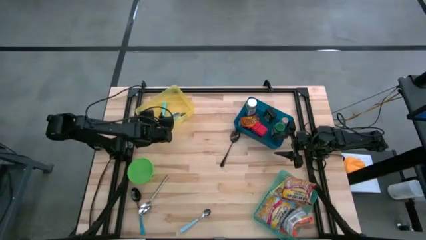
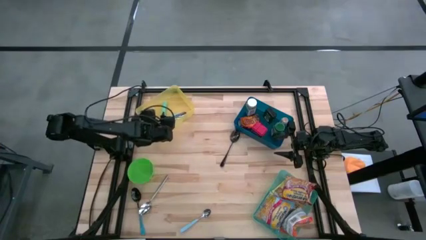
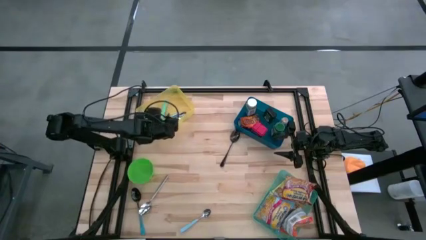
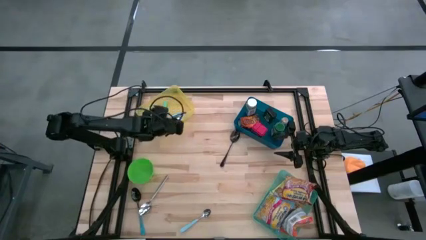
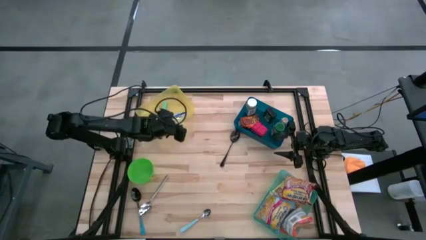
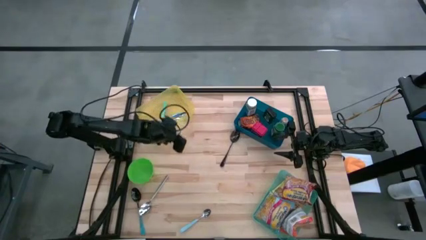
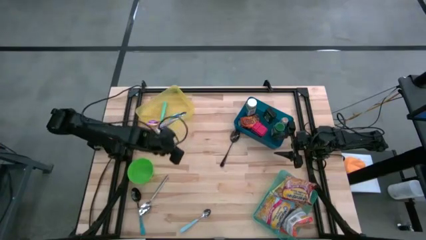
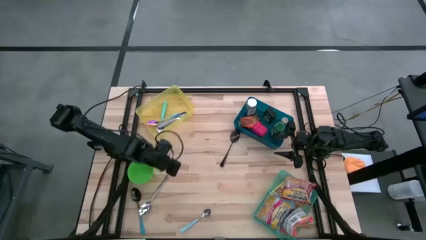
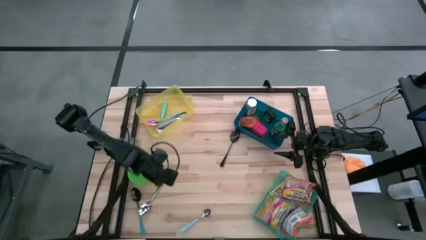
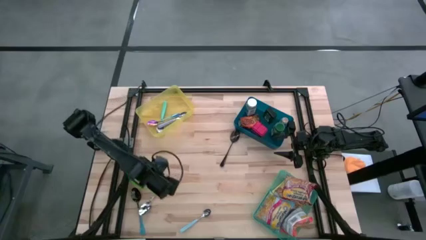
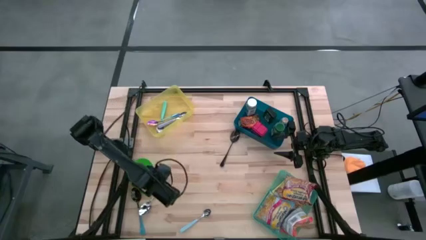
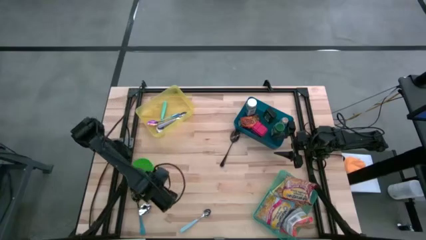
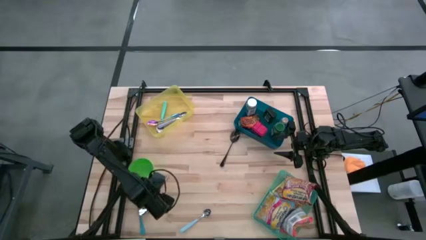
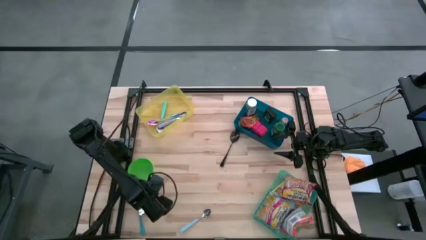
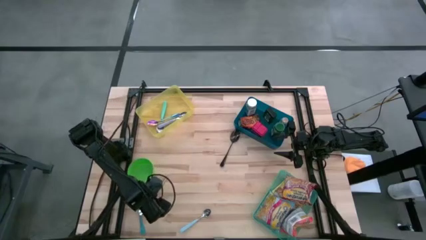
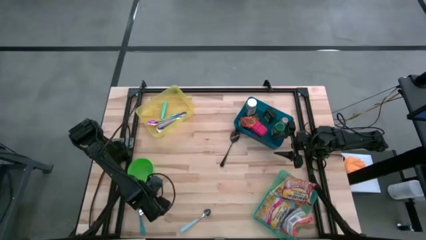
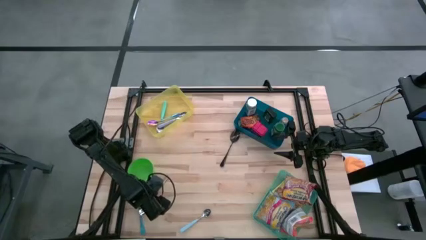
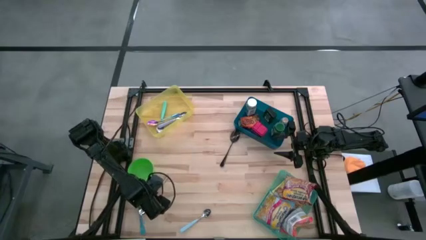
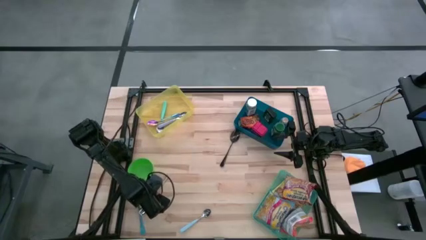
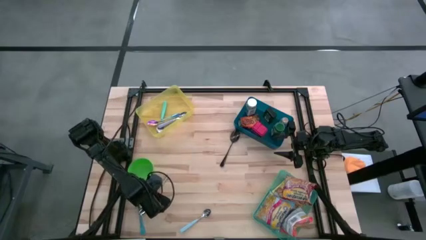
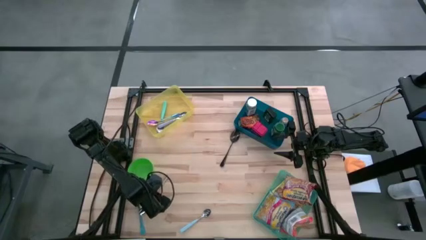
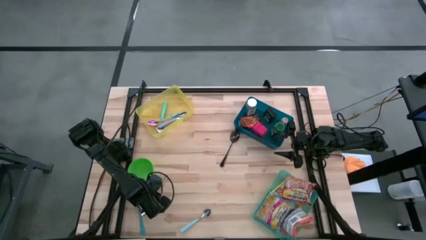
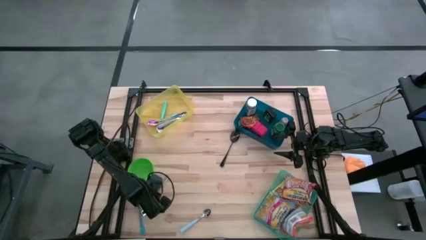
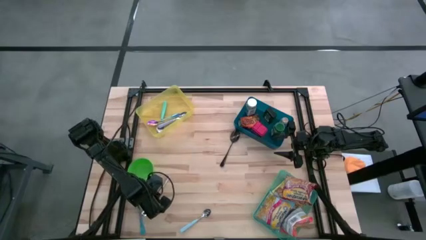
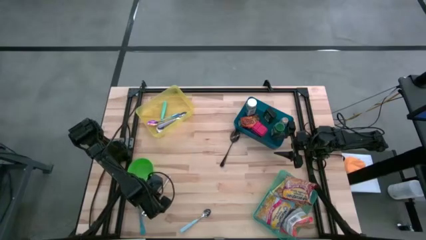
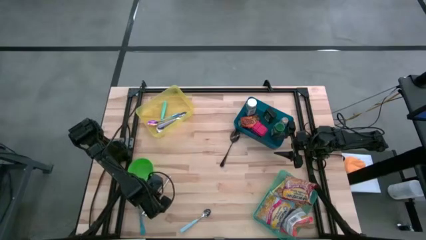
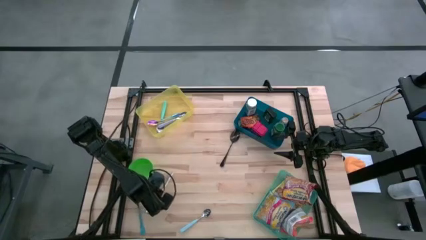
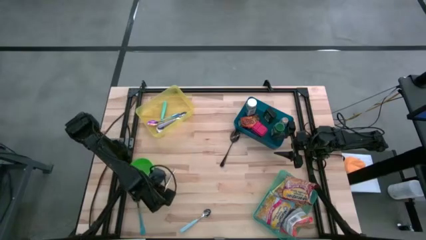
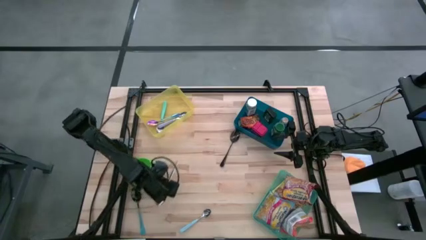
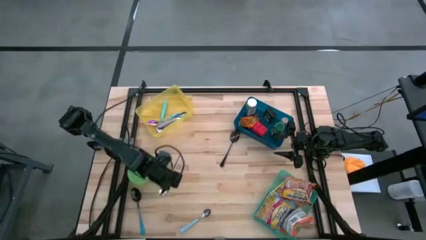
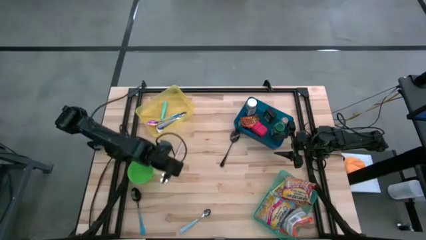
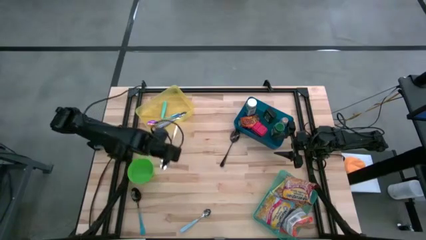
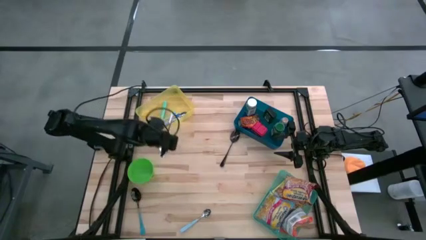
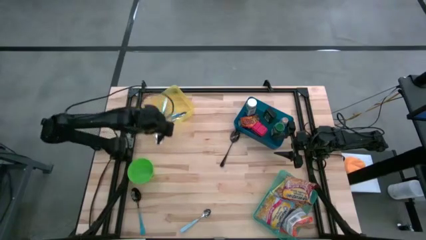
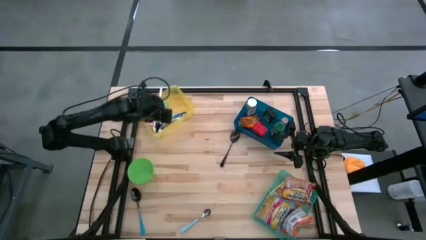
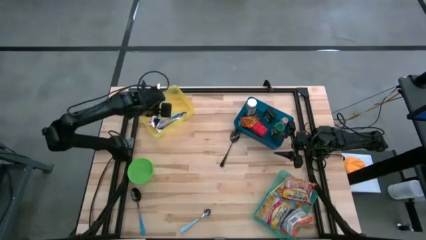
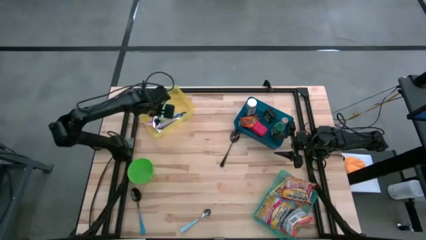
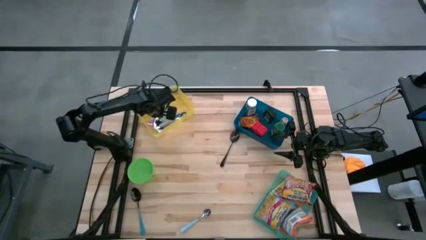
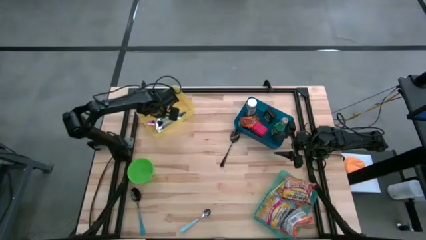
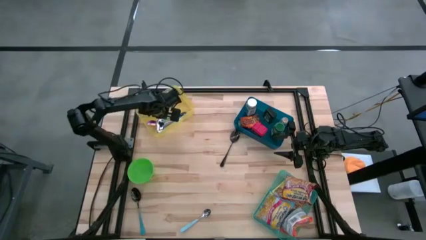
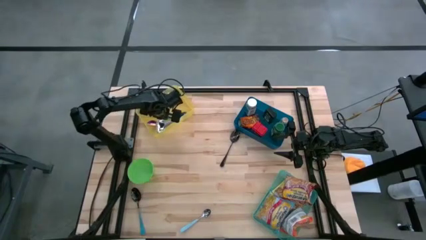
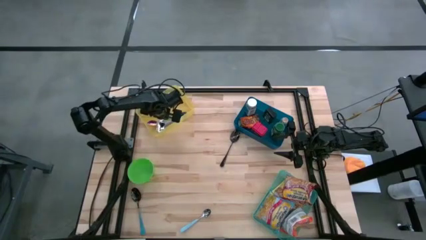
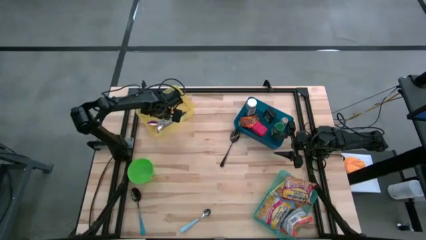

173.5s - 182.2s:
Put the silver spoon into the yellow bin

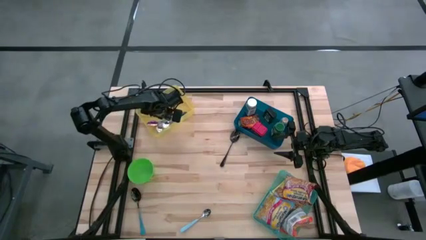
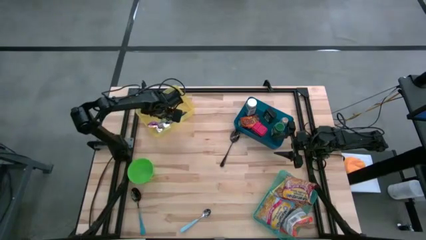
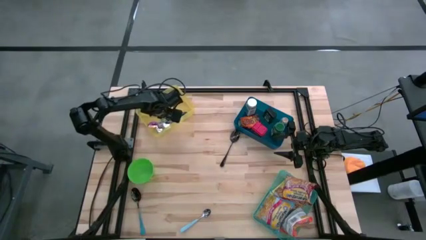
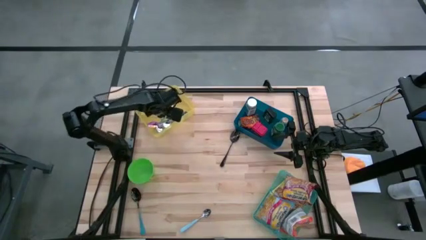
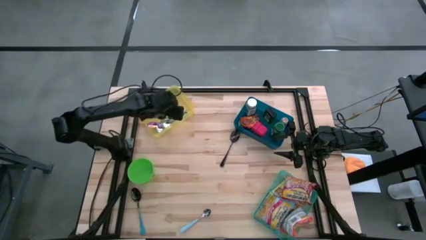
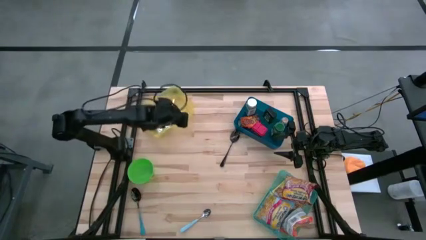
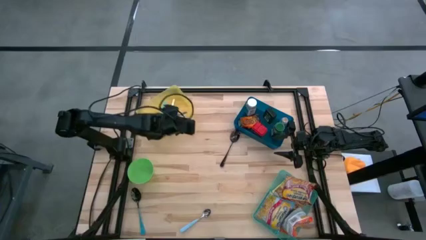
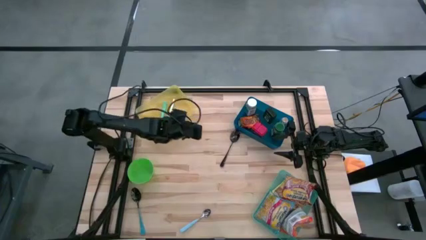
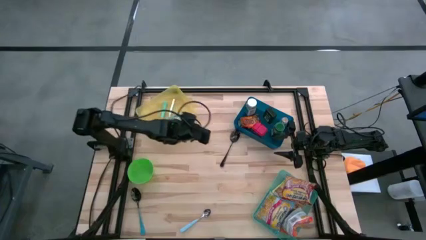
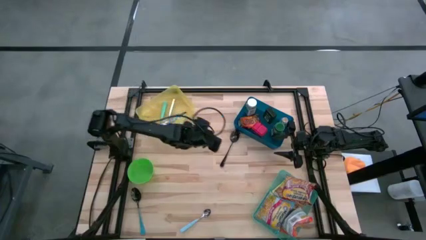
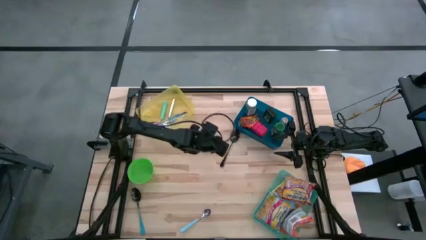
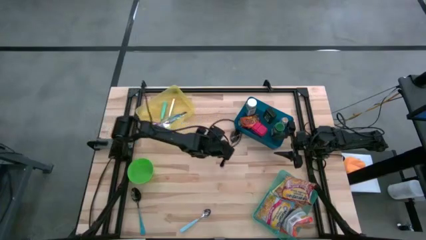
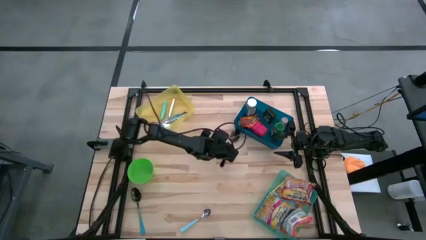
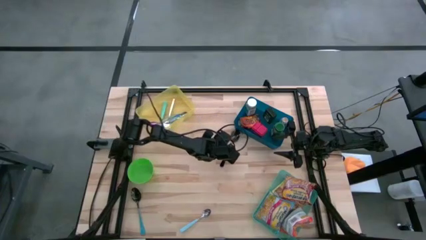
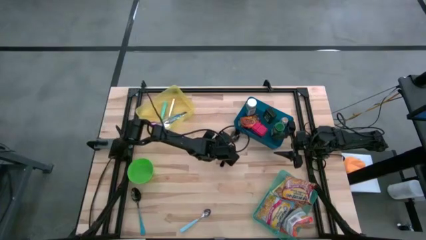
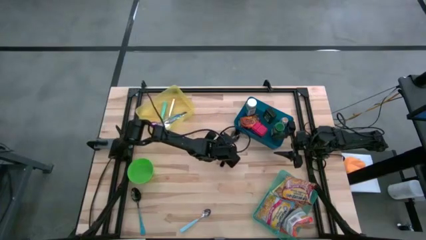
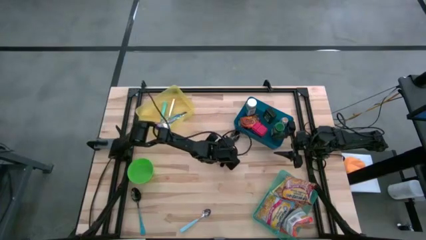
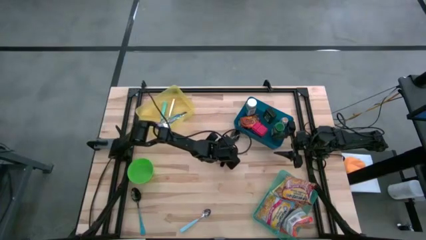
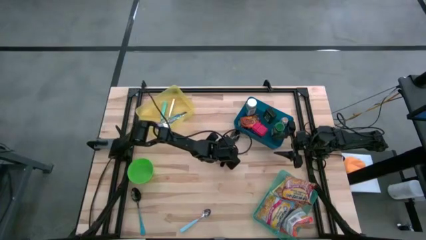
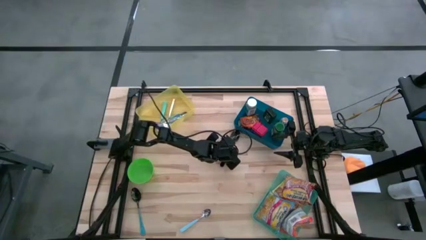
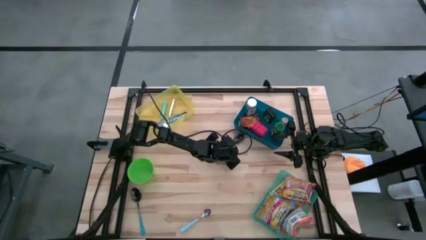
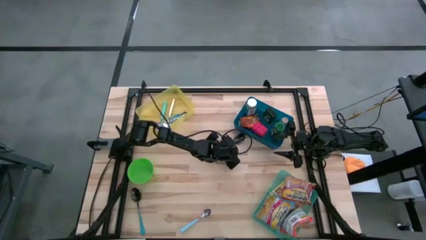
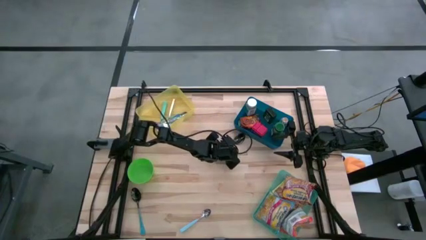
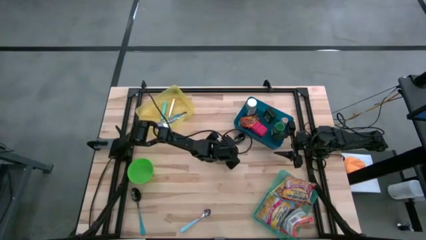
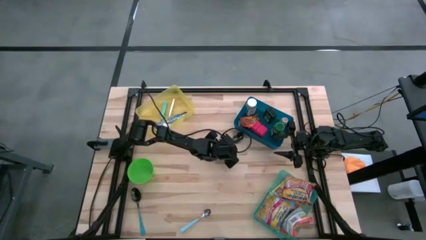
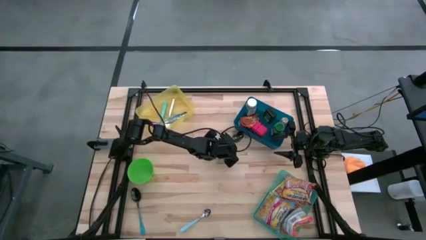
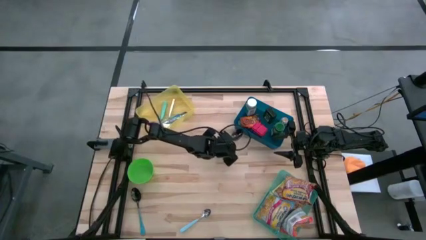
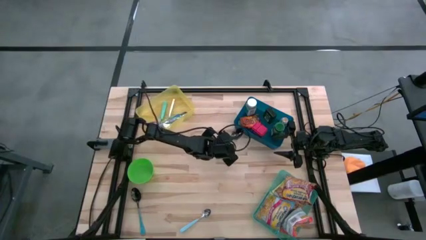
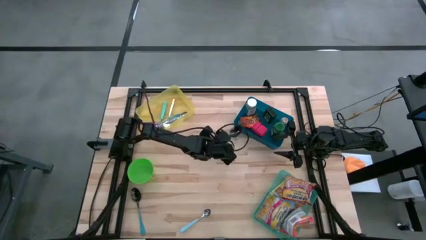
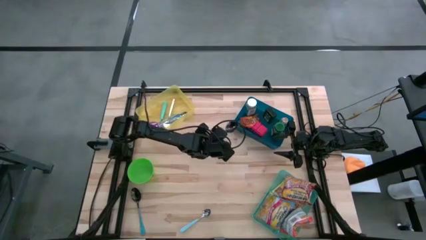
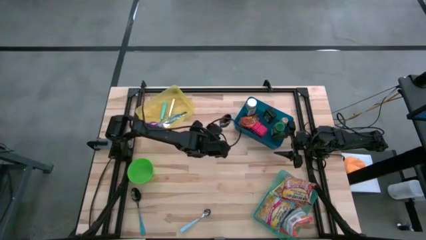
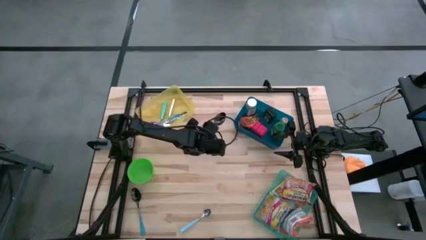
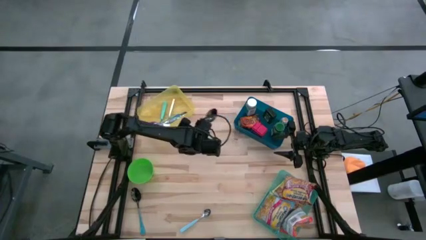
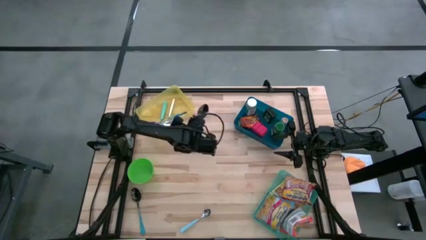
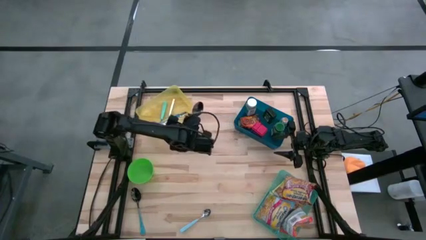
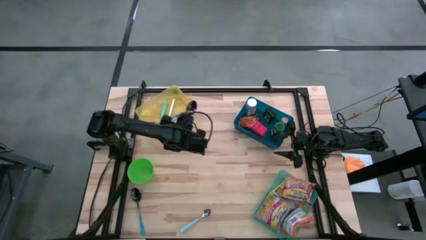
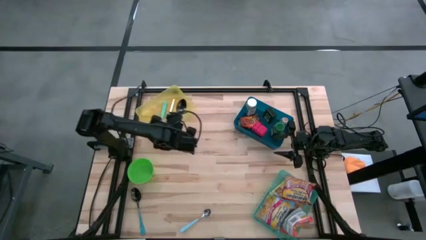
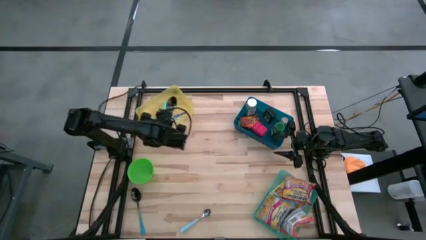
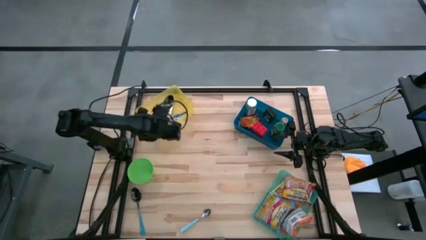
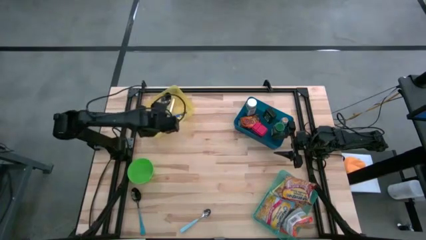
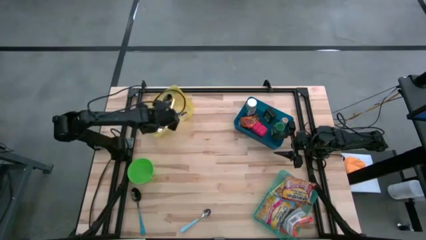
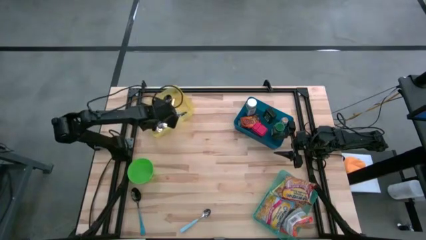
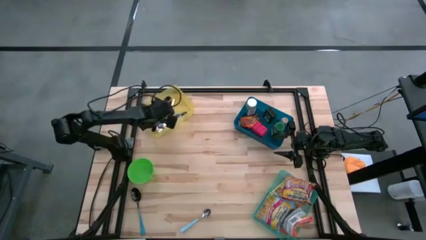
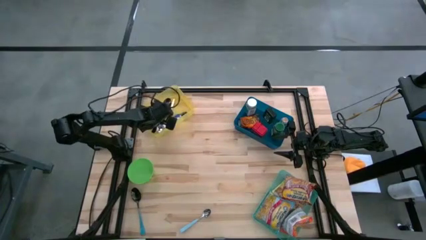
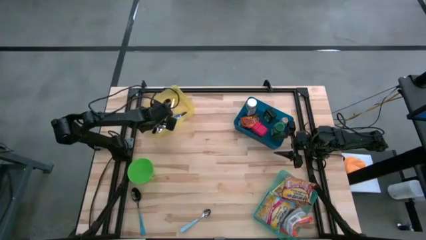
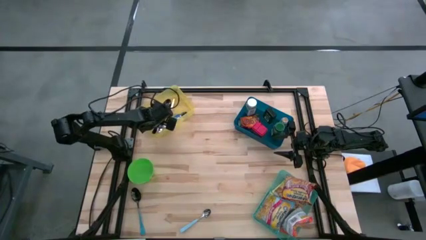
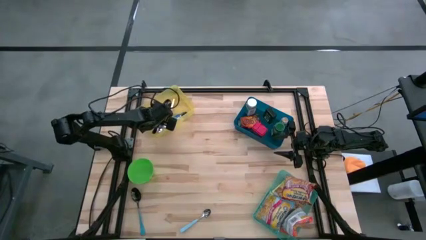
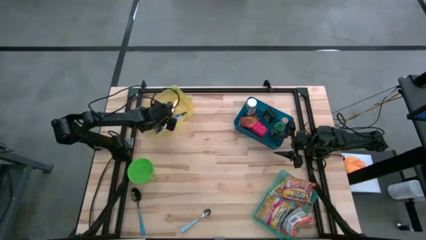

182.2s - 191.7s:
Put the black spoon into the yellow bin
